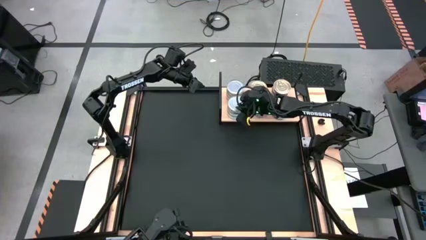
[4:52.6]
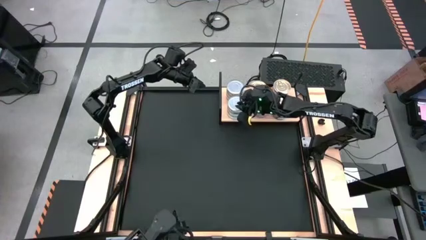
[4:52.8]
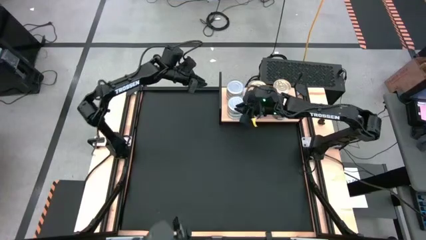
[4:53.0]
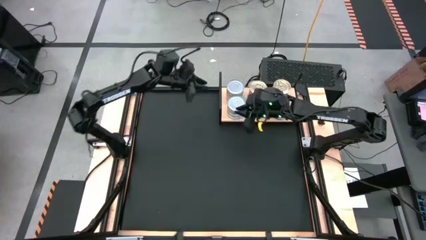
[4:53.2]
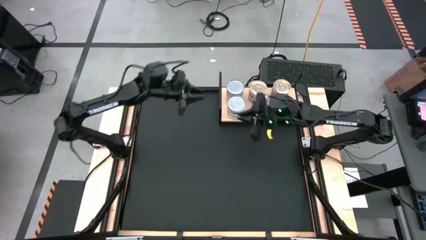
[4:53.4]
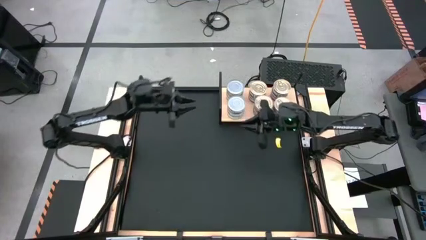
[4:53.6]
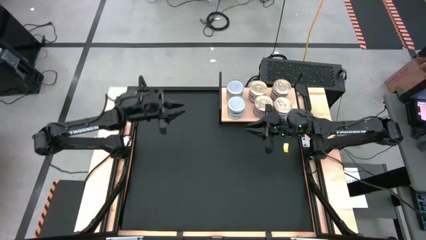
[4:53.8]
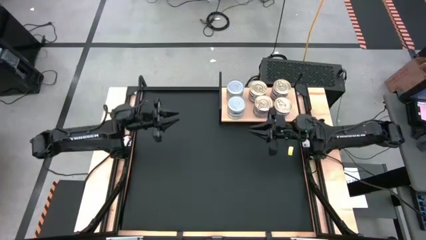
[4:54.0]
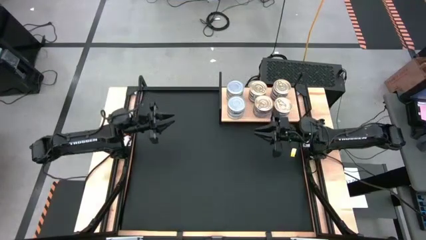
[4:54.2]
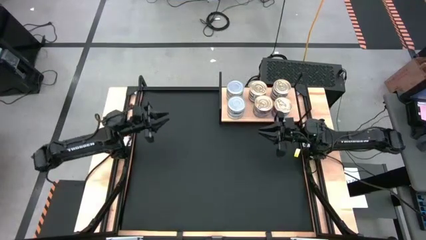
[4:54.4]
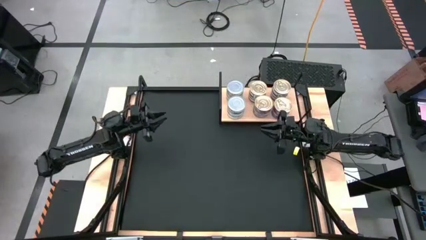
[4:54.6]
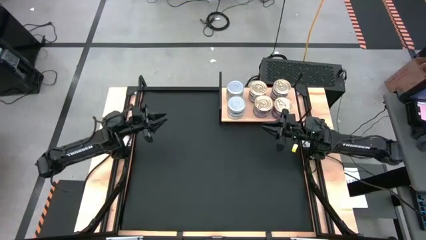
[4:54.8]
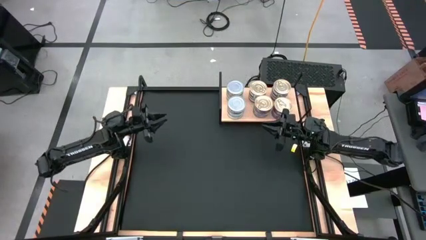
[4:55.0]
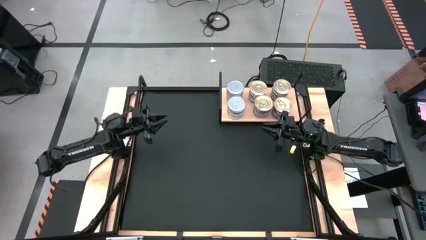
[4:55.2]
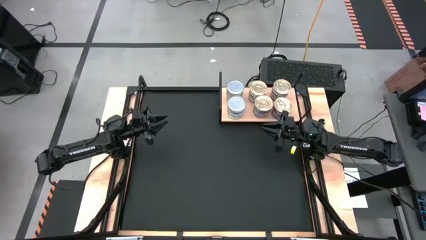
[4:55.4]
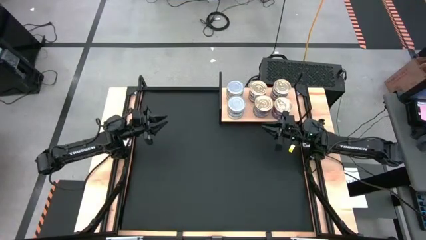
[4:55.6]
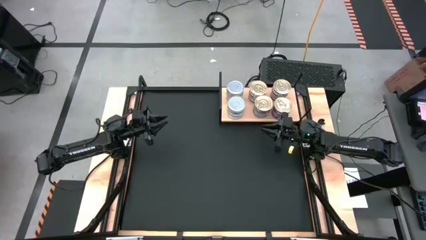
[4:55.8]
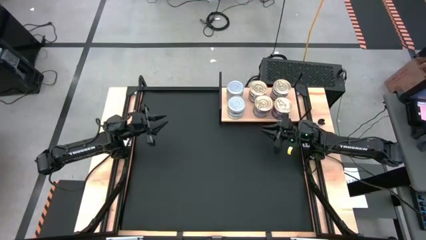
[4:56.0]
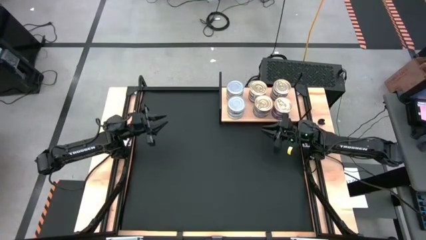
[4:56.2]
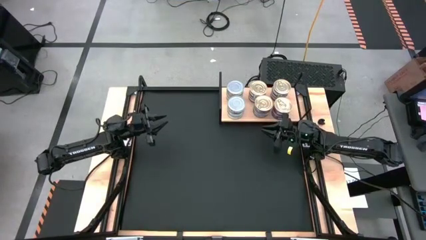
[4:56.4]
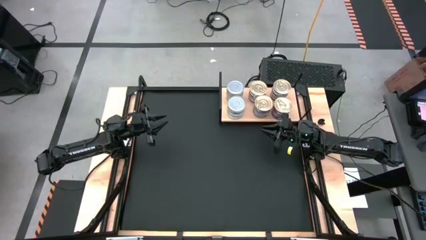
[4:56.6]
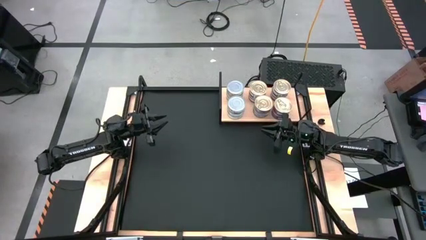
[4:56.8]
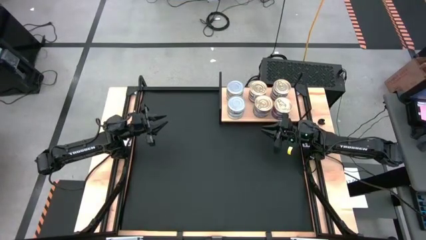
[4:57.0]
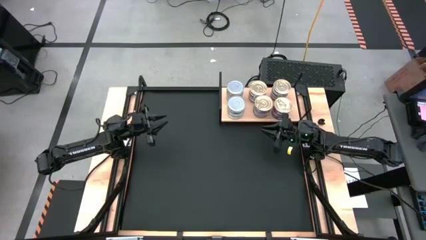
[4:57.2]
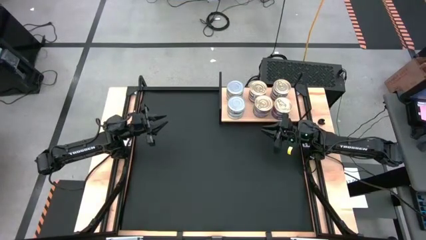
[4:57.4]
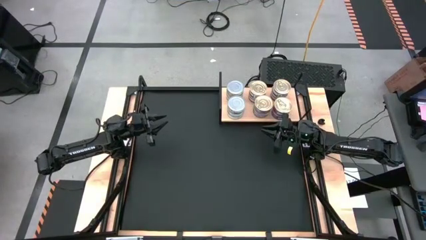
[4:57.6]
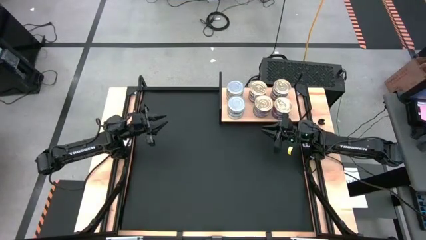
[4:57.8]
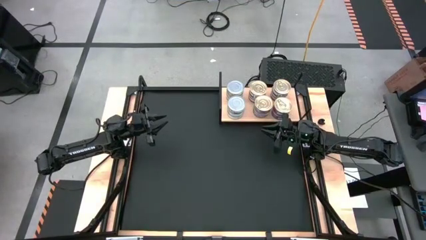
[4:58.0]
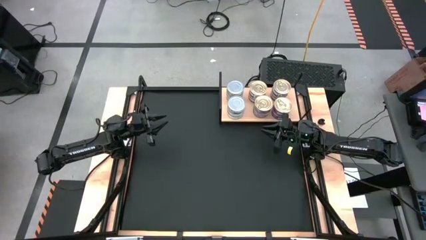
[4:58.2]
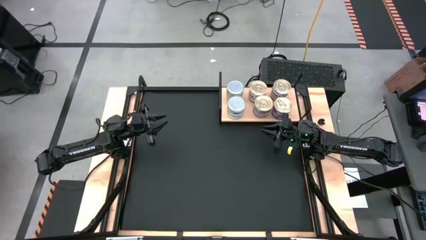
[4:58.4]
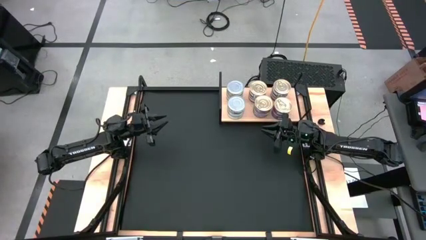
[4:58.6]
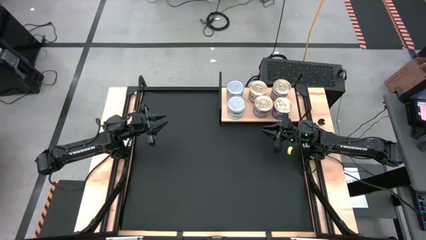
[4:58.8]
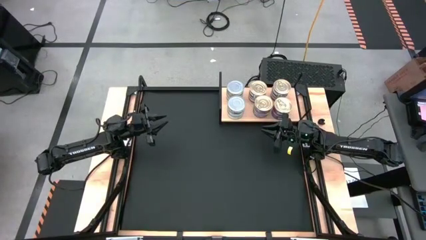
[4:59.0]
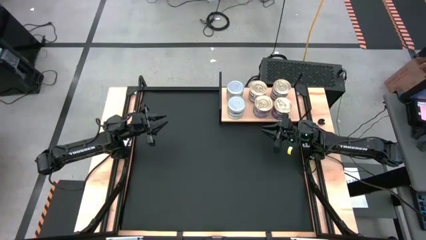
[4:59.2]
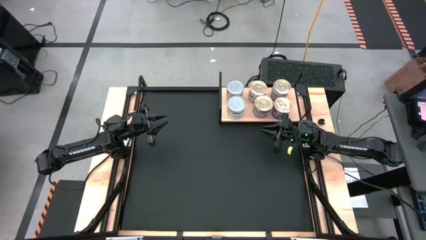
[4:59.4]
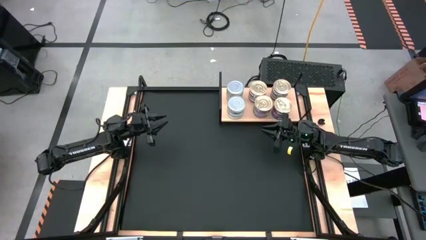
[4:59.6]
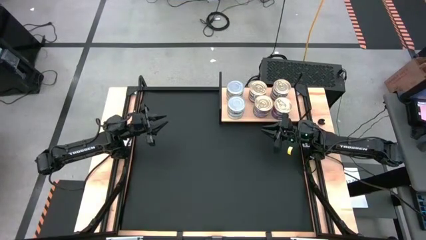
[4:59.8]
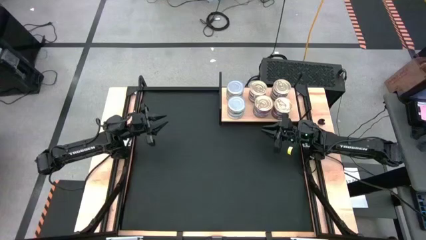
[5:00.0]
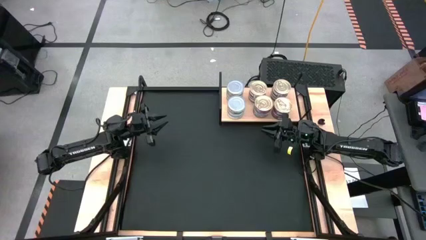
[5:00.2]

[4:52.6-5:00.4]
Task: Stack canned seafood by type on shelf
Return to Home Position

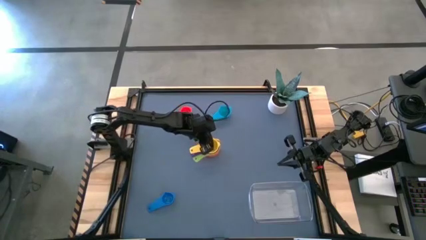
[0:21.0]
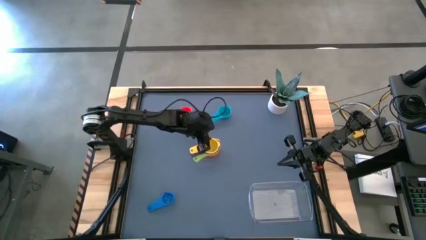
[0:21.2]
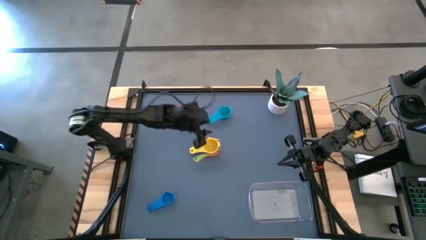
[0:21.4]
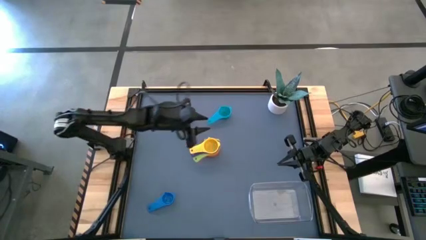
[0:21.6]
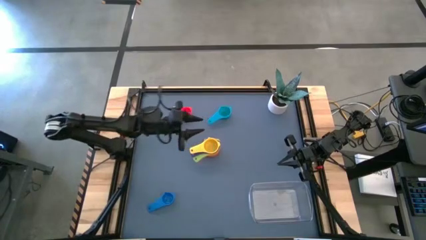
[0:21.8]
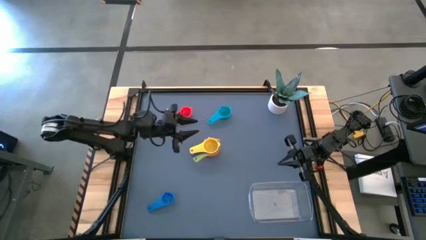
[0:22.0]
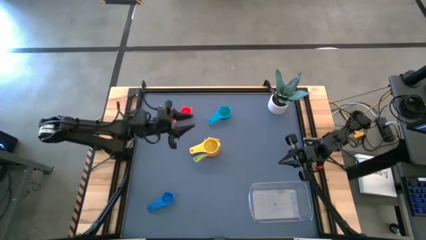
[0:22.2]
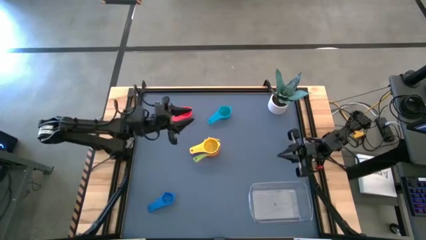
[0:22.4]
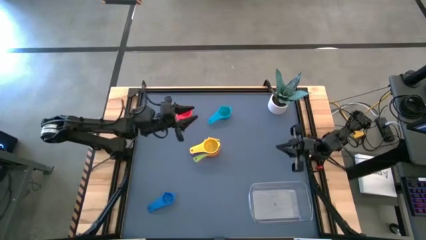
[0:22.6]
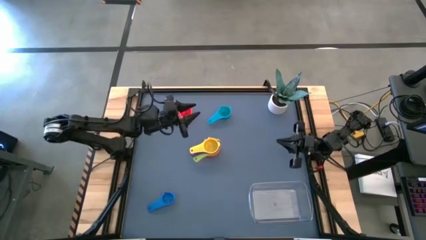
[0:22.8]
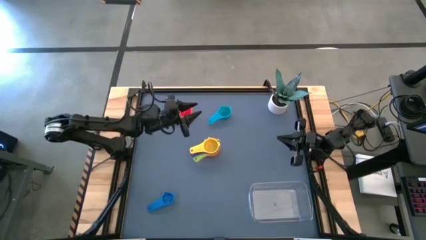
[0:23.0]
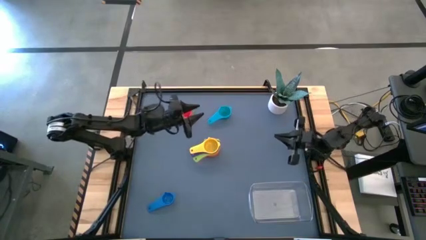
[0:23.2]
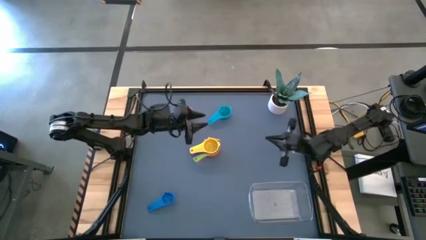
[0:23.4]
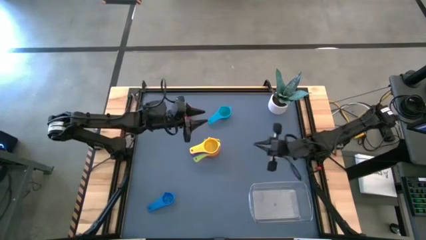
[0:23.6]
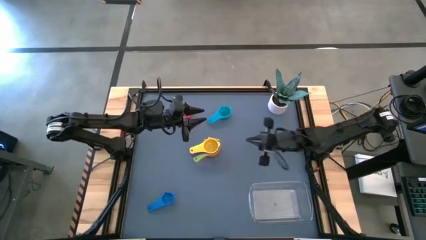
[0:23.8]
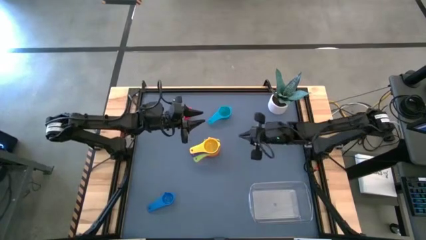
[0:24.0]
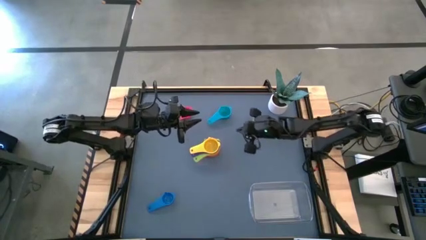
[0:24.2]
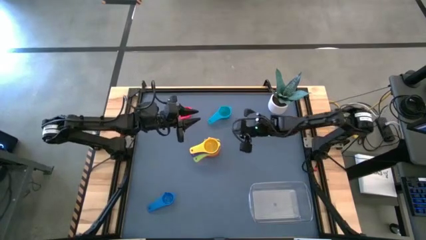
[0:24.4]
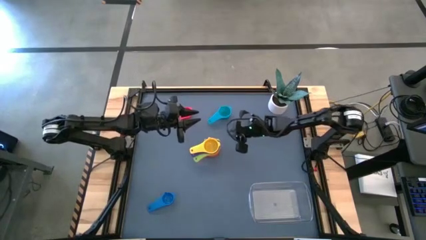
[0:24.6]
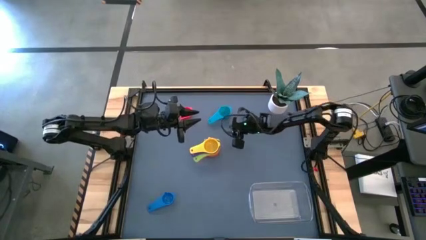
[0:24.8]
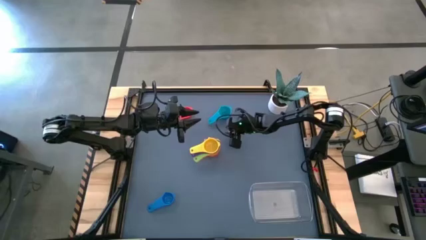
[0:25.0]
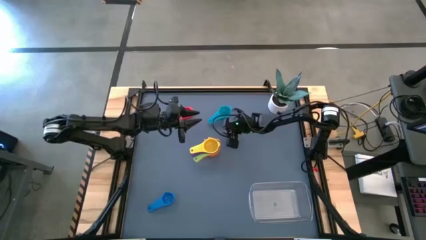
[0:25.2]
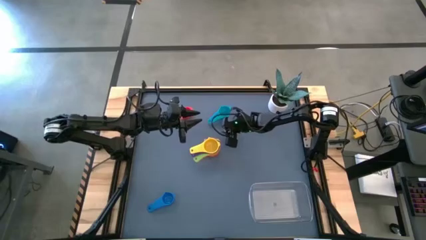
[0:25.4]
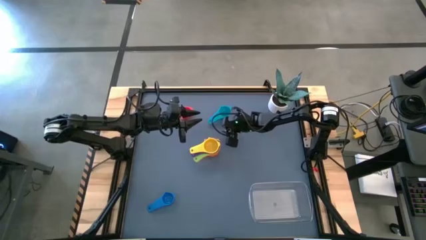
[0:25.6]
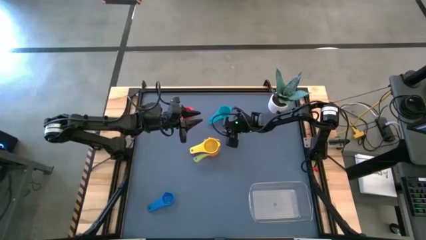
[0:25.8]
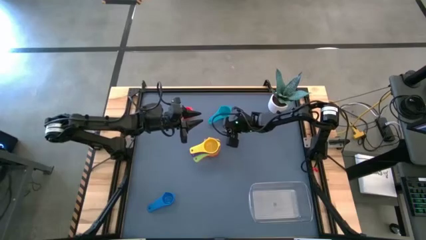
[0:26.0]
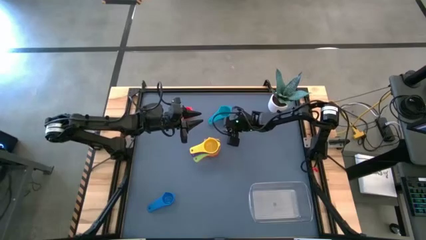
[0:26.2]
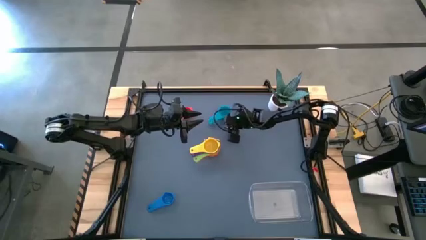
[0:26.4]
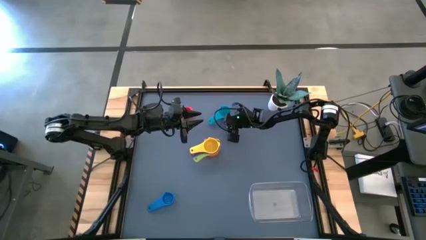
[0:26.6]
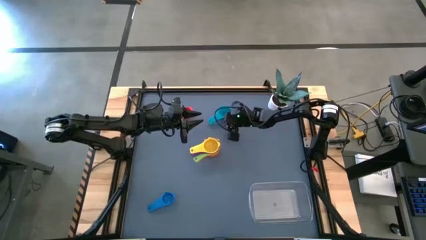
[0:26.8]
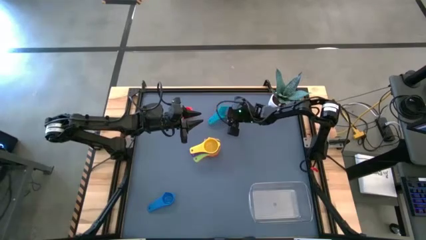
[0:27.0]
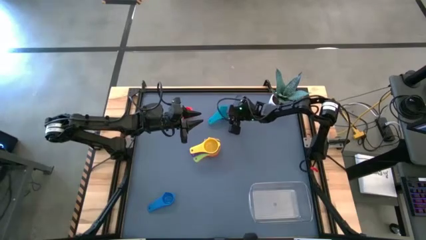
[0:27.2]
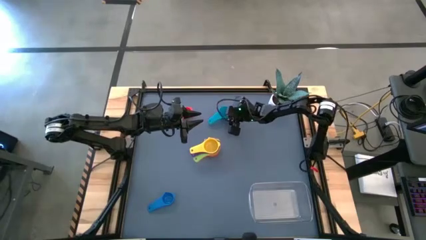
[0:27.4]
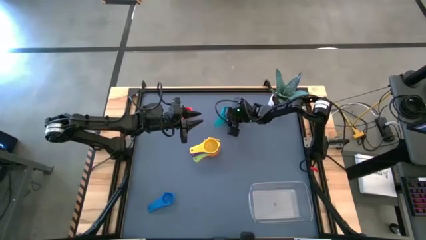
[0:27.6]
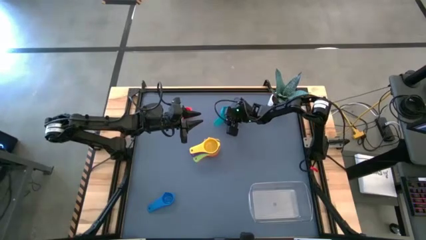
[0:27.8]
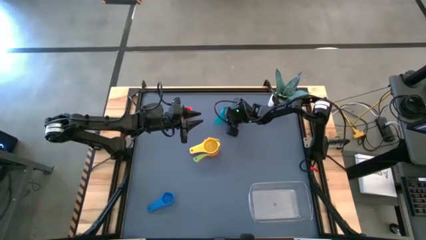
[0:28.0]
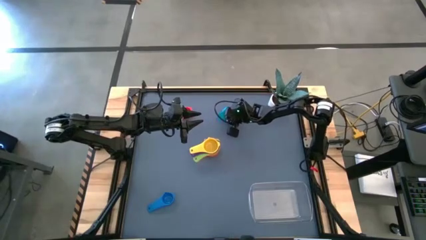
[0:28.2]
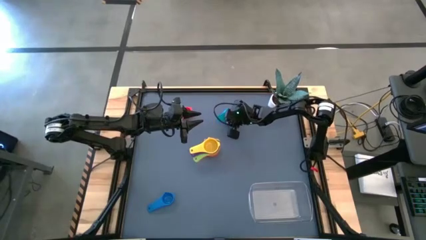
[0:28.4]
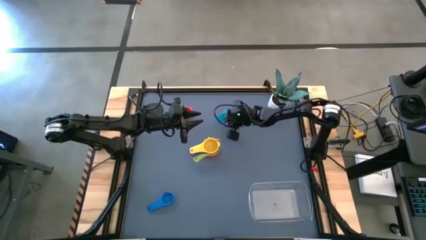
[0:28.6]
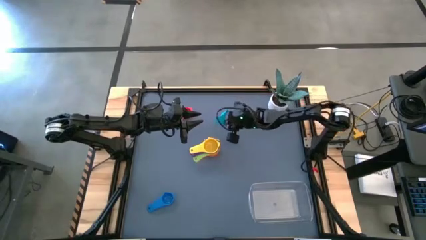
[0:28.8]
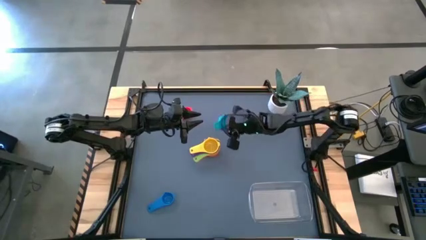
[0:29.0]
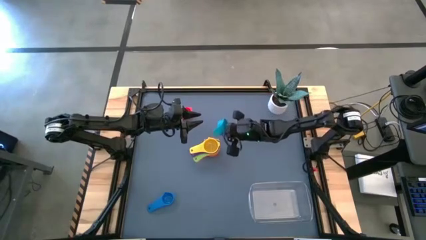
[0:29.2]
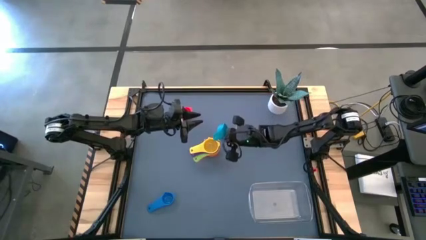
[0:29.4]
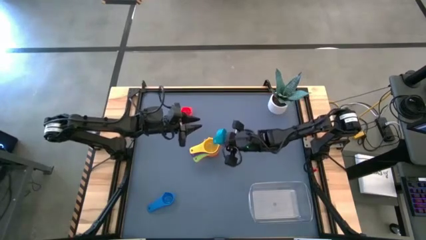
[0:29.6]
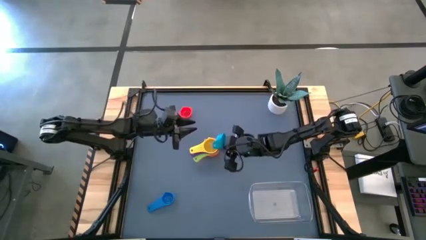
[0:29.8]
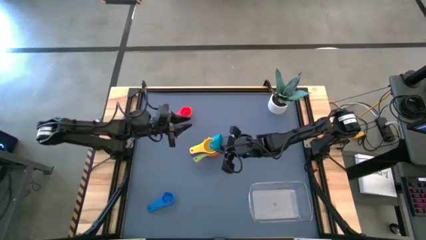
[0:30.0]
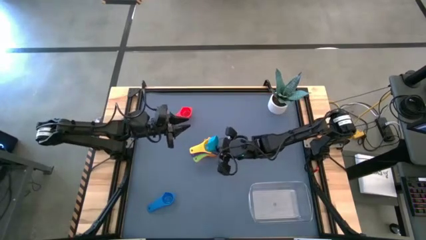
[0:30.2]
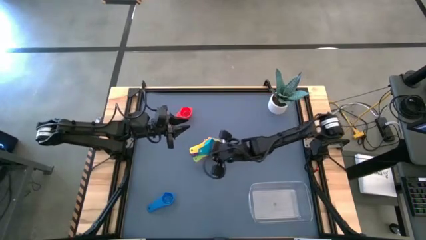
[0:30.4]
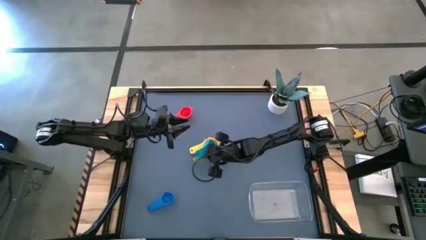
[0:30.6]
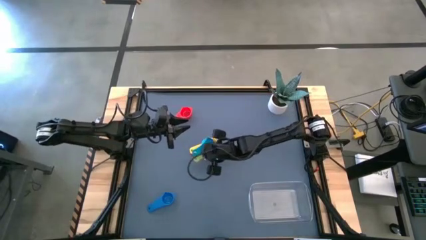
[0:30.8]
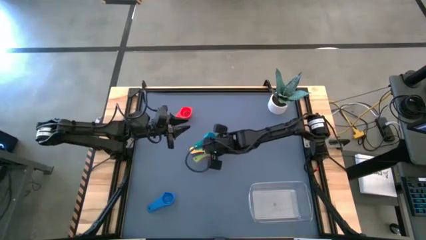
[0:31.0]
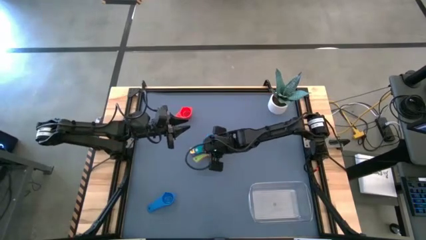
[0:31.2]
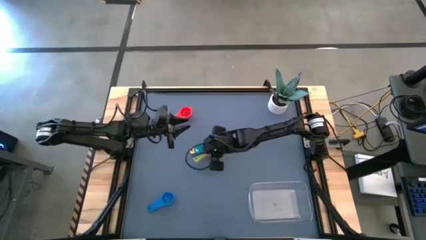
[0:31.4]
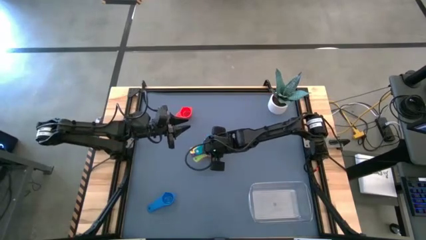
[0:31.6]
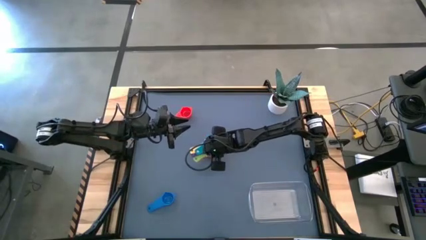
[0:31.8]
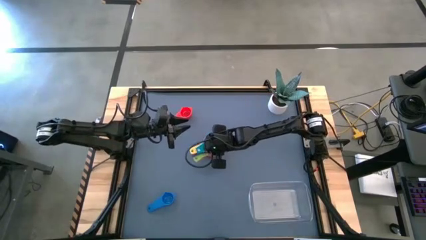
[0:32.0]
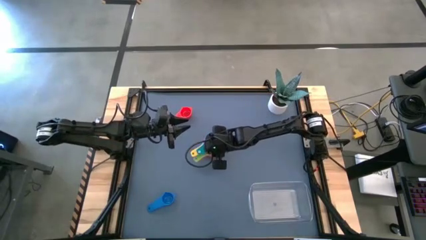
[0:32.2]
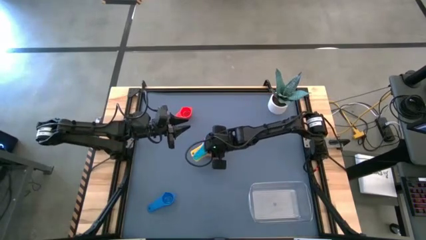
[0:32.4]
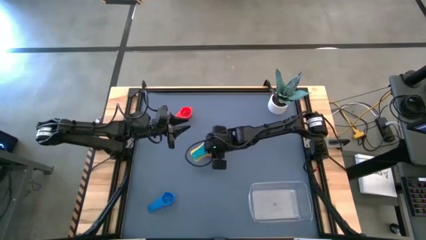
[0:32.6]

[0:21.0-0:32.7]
Task: Nest measuring cups in basket
Stack the light blue measuring cup on top of the yellow measuring cup
